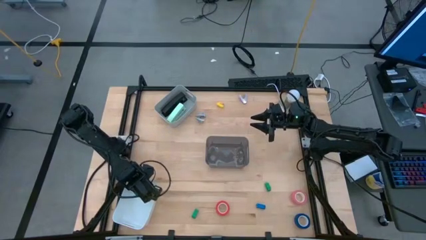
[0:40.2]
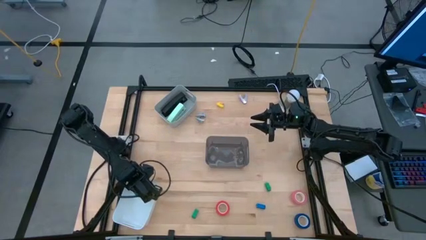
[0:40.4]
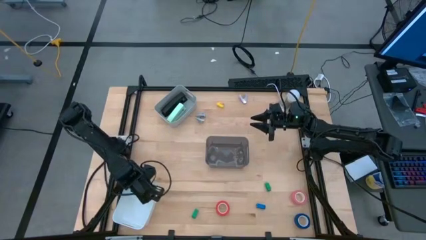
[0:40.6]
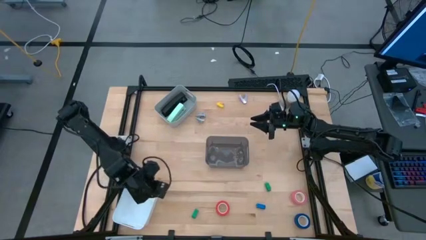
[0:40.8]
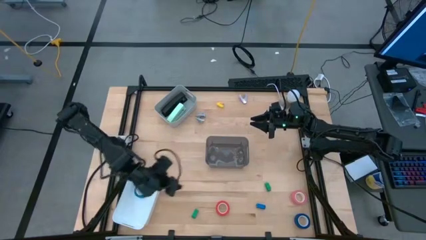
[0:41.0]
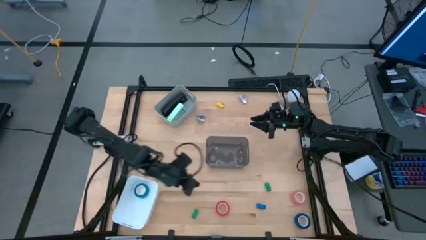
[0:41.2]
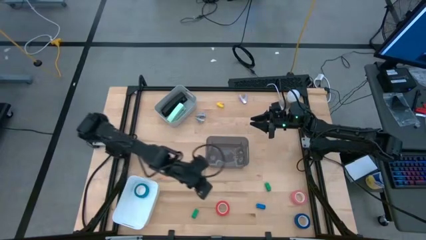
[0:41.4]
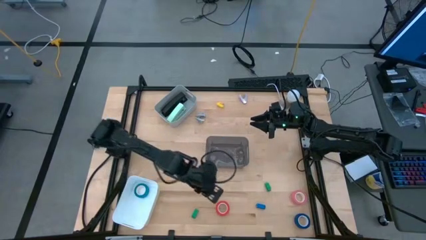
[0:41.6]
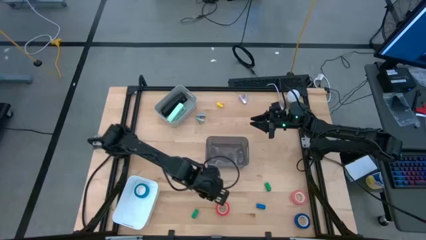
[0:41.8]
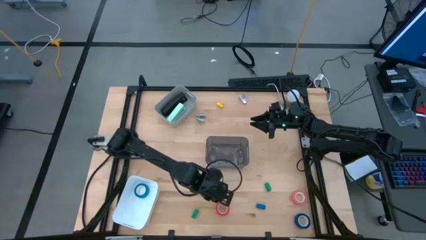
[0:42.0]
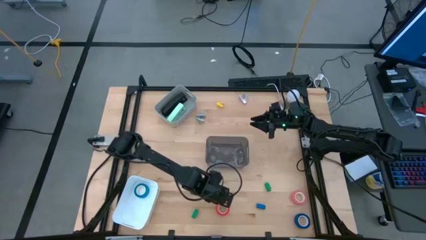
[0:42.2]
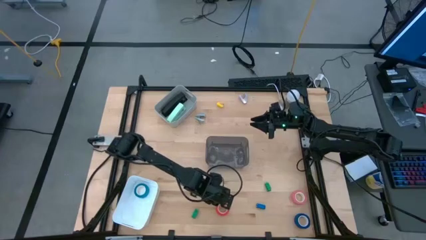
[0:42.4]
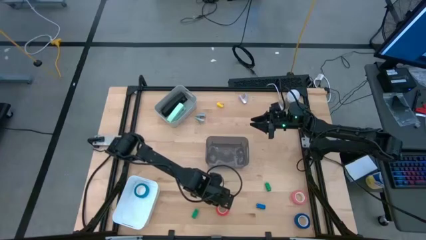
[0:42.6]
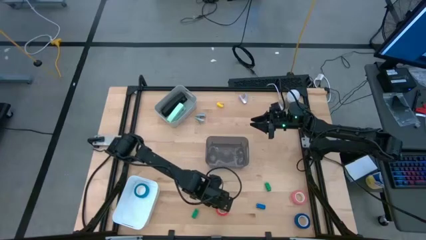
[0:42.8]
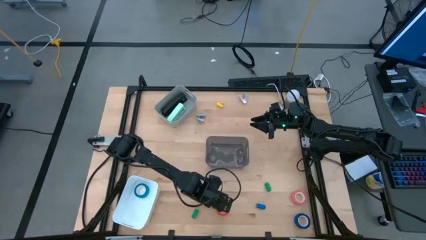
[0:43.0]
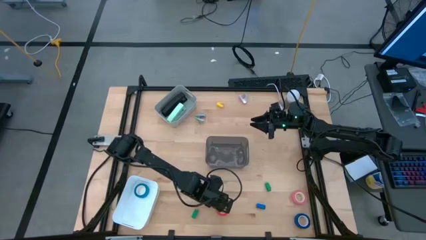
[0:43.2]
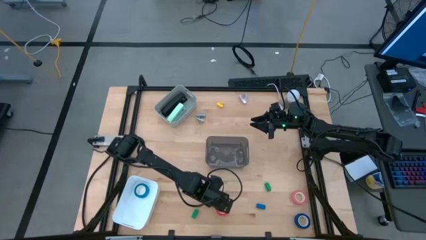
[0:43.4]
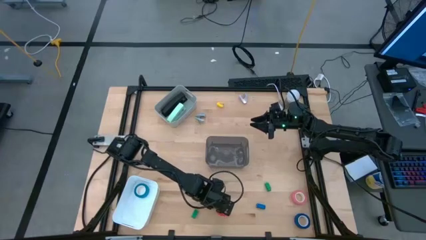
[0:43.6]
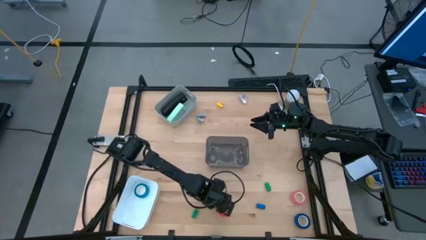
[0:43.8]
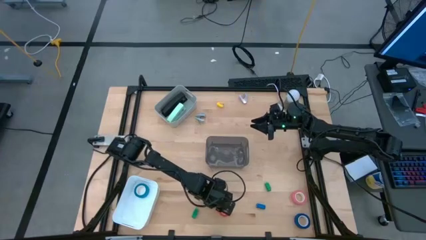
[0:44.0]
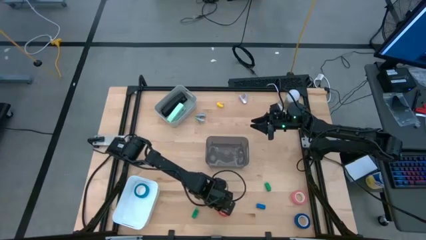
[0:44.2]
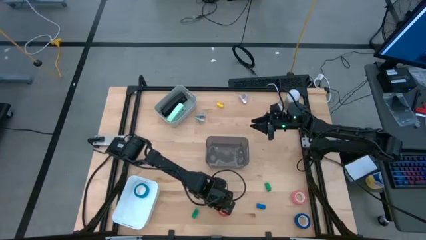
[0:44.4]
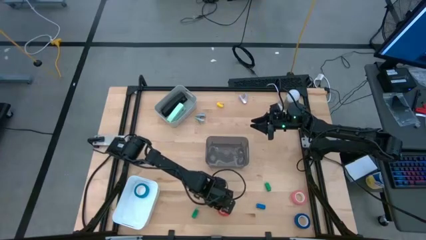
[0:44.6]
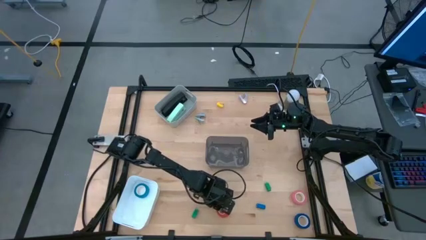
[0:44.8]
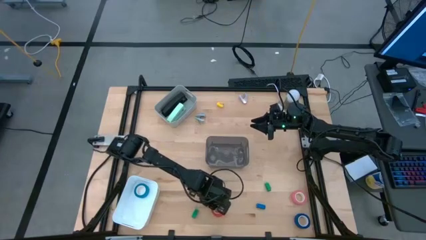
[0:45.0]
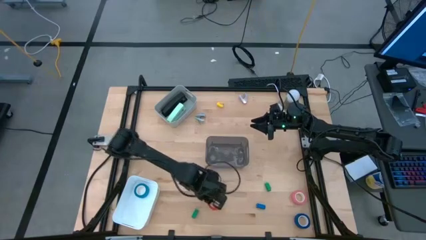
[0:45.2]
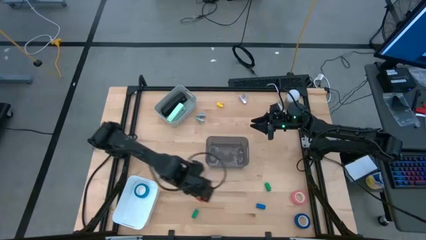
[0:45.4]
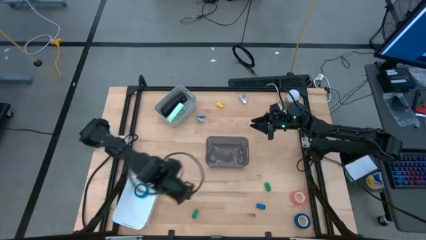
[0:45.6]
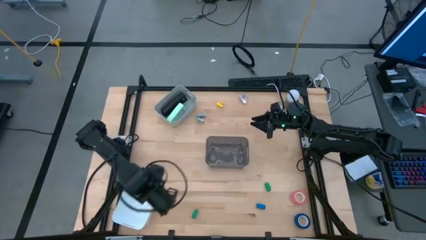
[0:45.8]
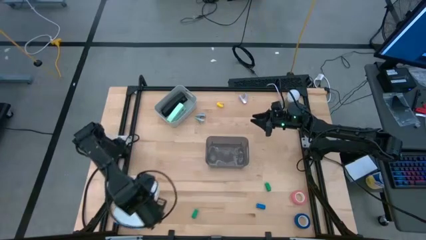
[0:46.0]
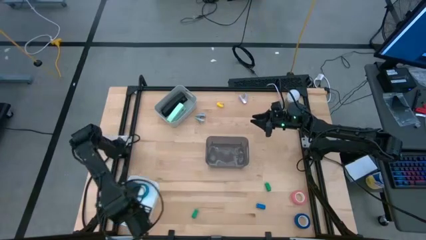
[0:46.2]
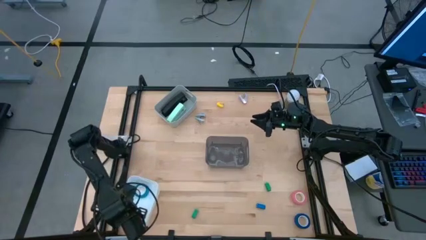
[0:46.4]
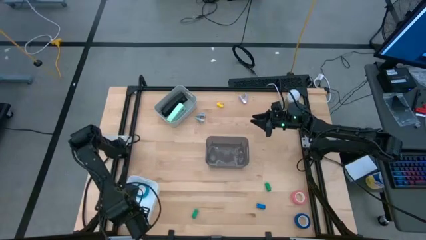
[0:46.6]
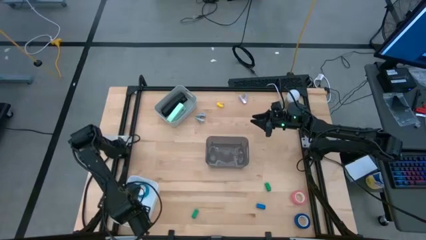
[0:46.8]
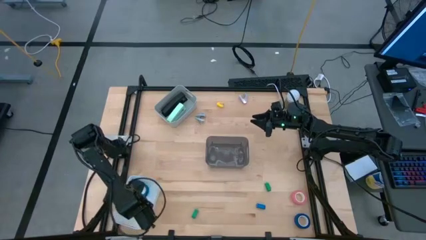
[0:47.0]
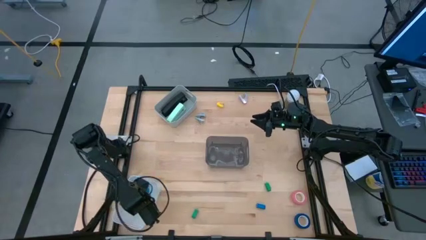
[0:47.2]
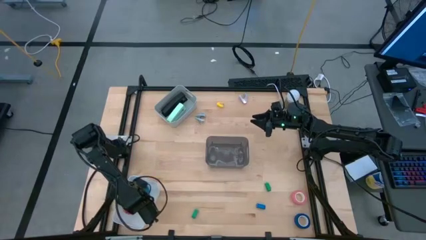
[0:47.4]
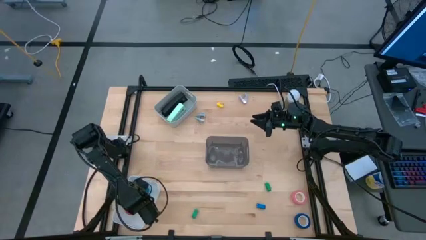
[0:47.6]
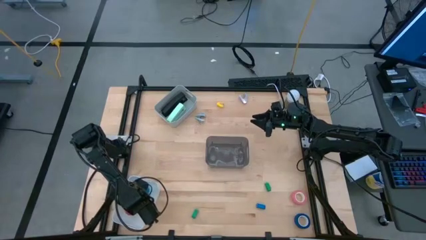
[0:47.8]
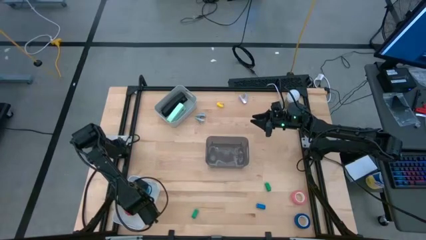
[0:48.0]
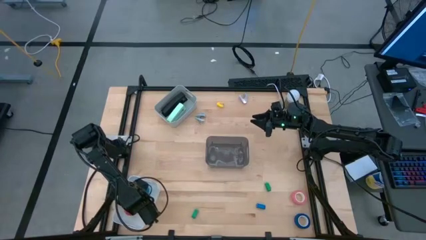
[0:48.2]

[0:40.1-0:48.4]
Task: Pick and place Stapler, Stapler remover, tape
Put the orange tape into the white bin

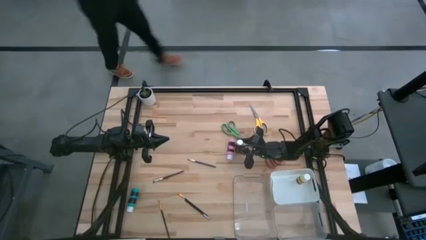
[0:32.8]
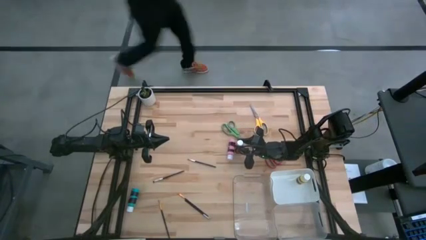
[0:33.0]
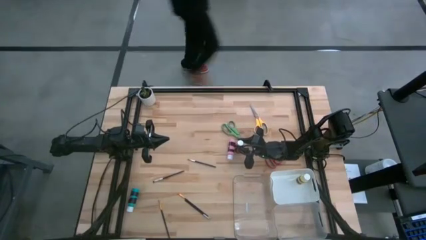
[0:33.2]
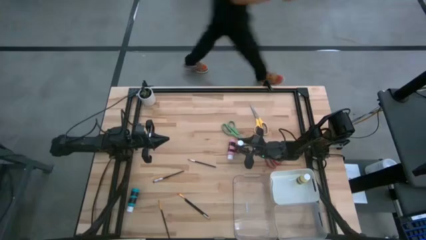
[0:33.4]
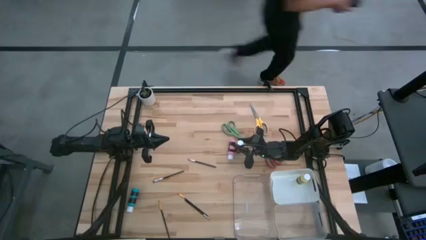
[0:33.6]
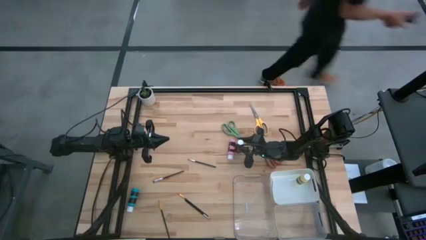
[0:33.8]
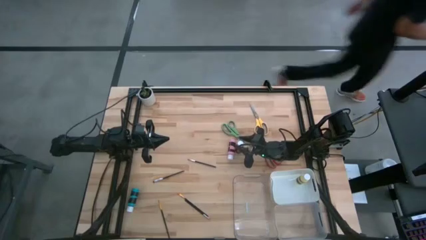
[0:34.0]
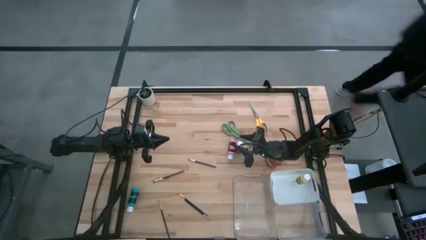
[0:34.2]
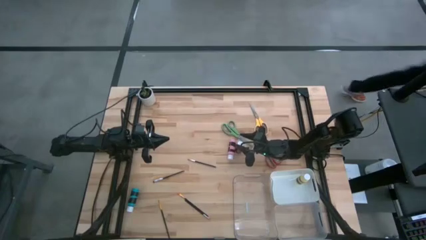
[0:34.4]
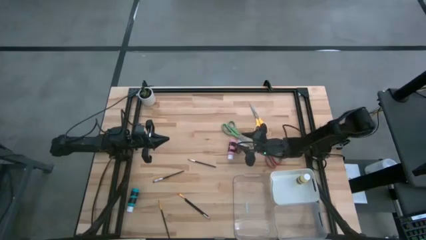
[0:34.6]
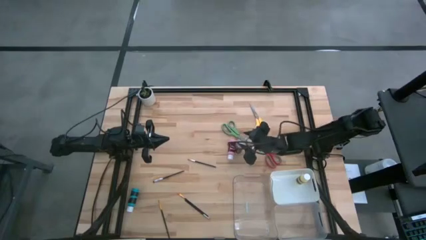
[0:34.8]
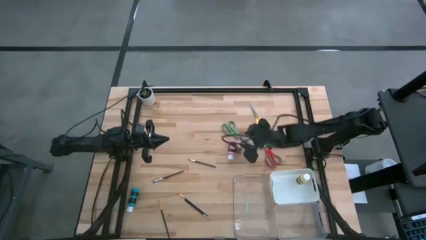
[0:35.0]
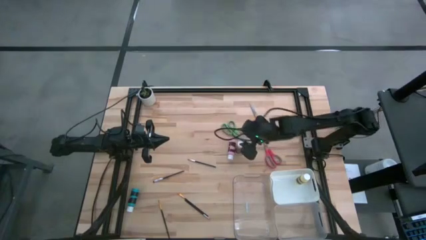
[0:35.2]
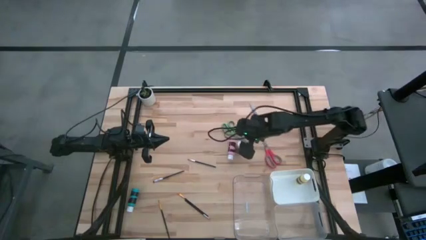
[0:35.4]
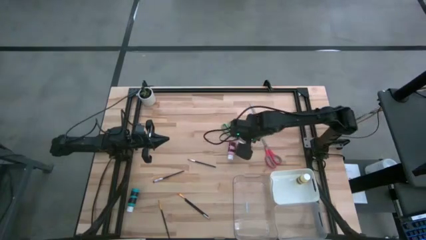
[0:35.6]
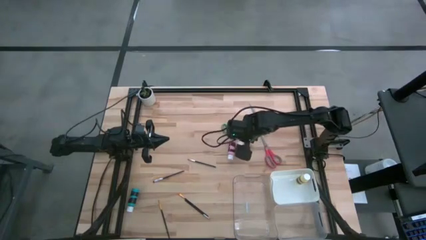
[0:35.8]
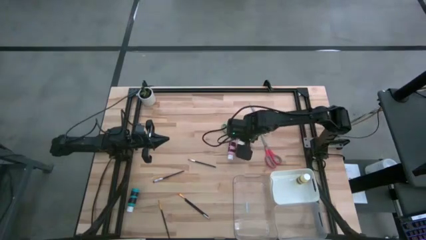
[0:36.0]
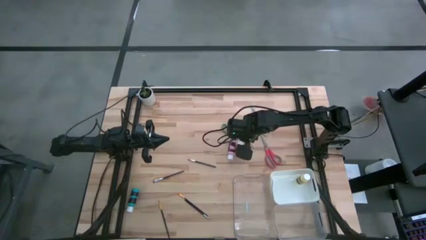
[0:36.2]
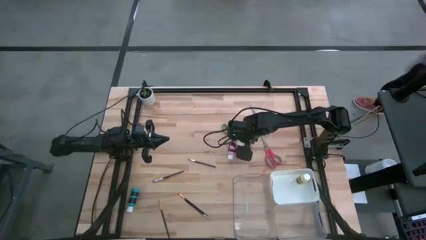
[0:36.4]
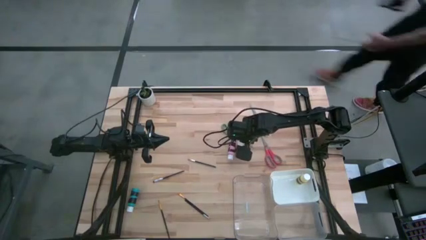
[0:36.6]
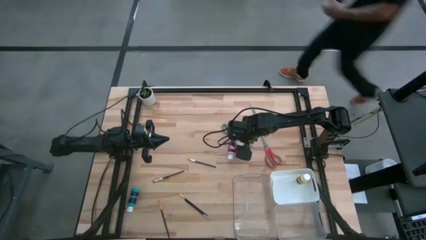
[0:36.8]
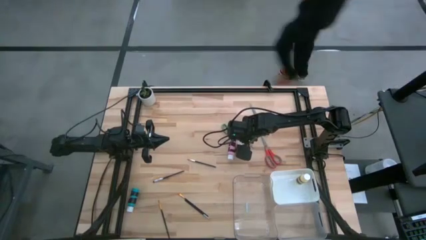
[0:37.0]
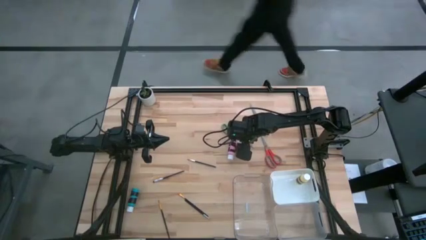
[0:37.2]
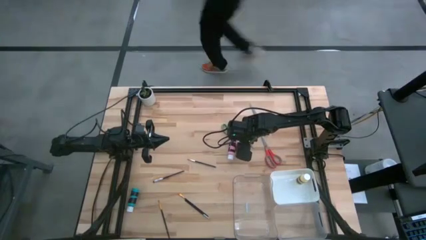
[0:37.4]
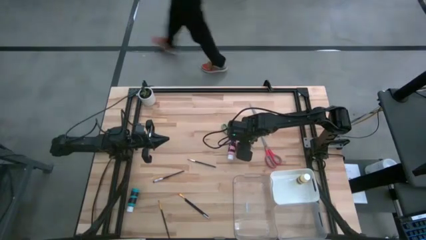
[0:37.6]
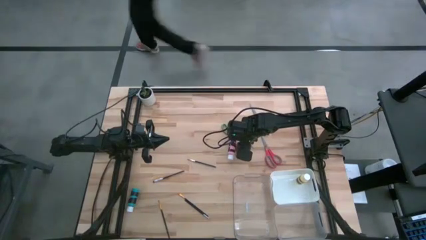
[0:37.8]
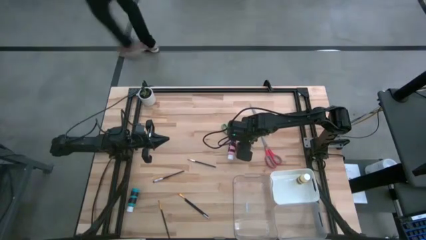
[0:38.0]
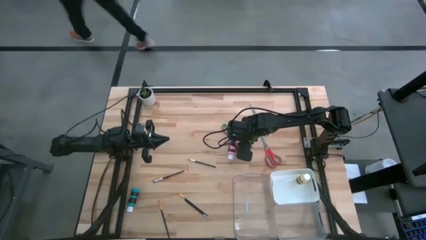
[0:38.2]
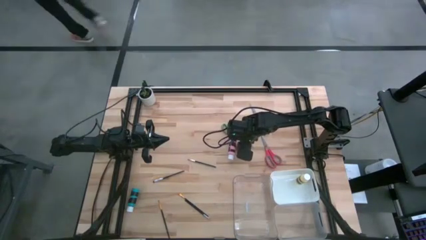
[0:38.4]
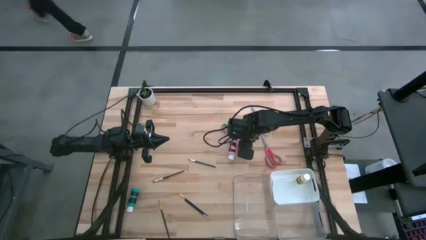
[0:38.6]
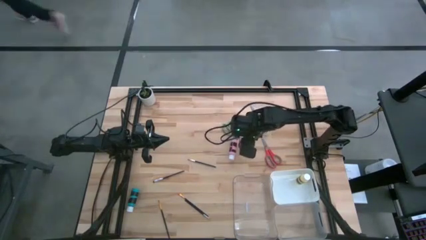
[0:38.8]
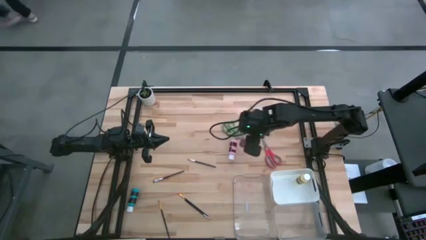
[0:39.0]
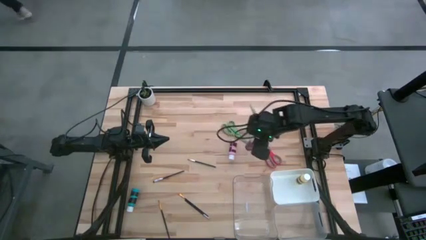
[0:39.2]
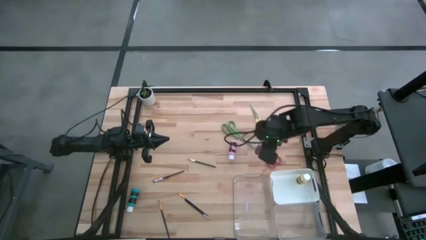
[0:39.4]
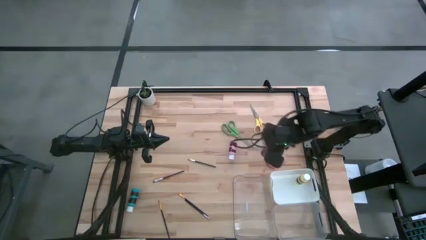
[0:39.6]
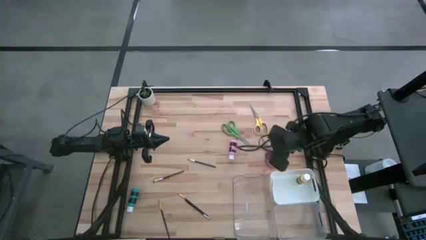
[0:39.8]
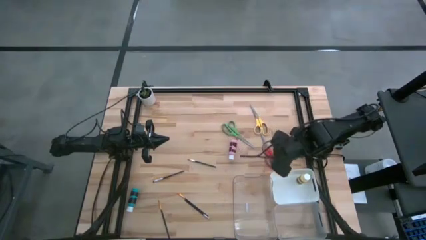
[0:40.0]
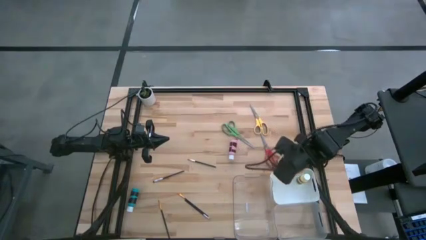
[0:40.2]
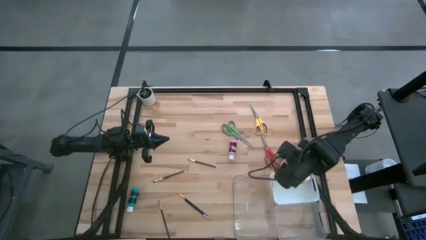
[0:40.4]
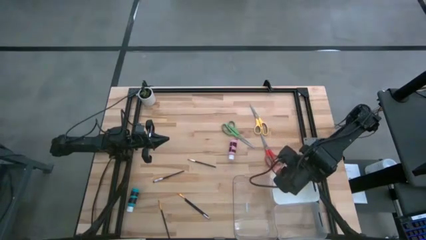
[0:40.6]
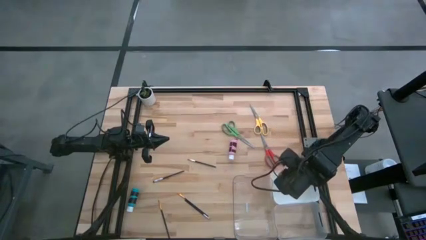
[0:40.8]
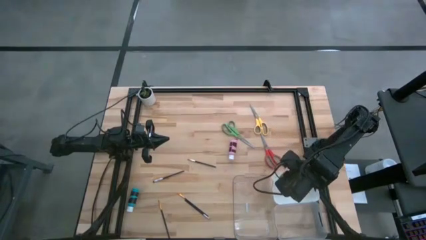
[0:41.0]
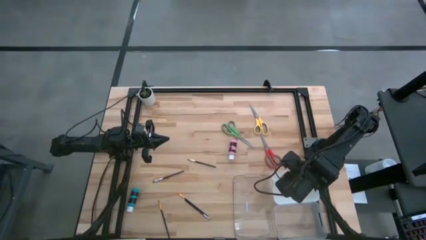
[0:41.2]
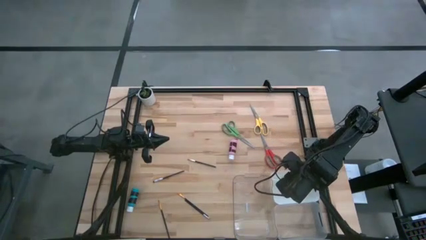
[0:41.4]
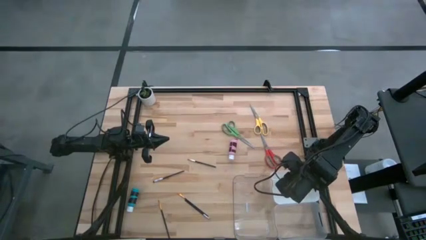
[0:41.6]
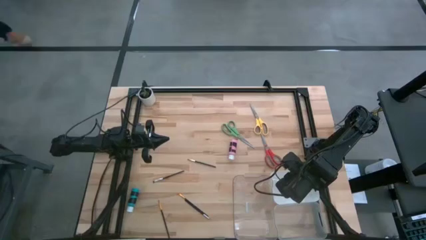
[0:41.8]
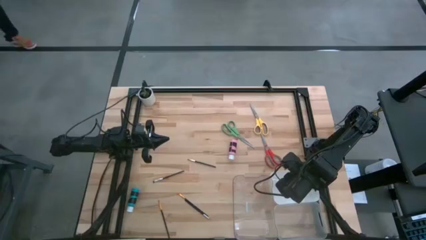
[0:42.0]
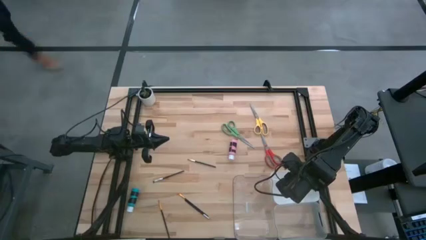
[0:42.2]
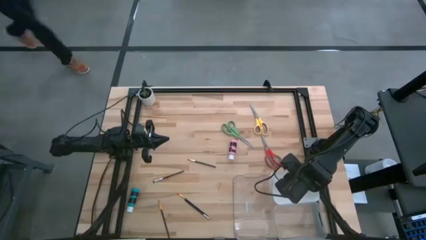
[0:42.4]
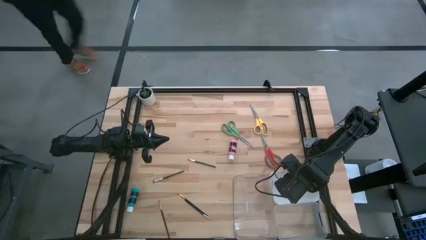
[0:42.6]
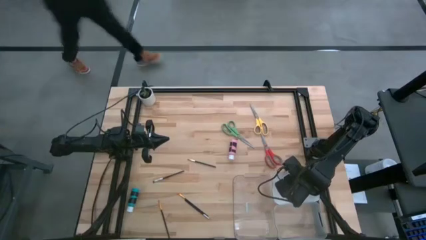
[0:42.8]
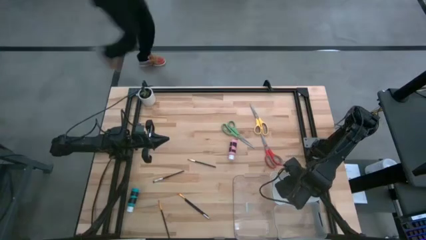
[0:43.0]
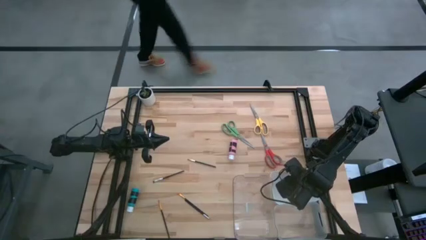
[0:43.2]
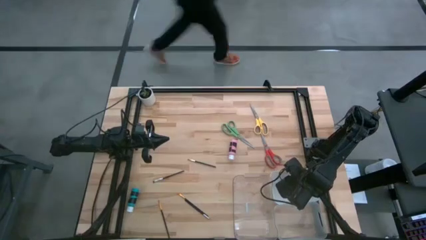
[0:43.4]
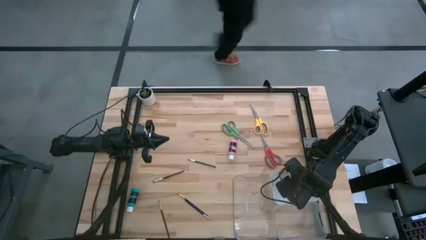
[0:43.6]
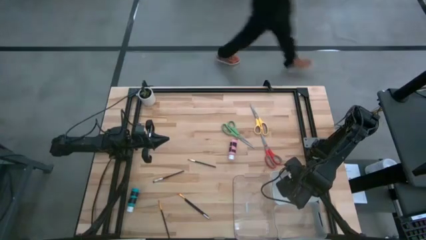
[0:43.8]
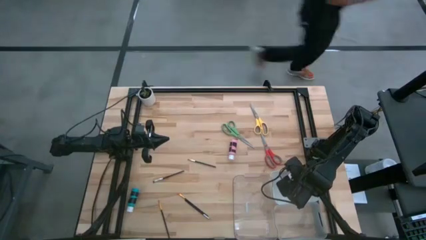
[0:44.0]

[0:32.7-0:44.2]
Task: Pick & Place Paint Supplies
Put the red paint bottle into the white bin
